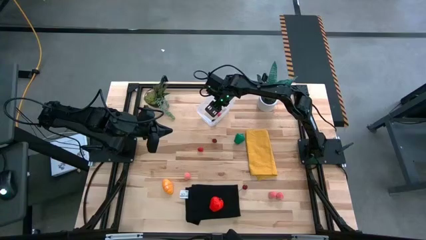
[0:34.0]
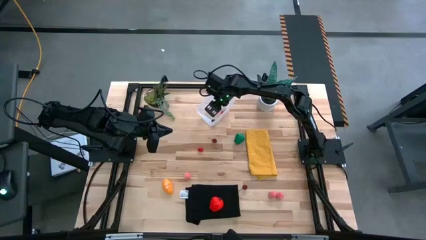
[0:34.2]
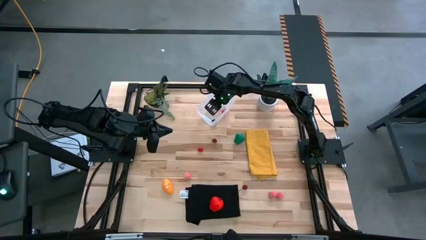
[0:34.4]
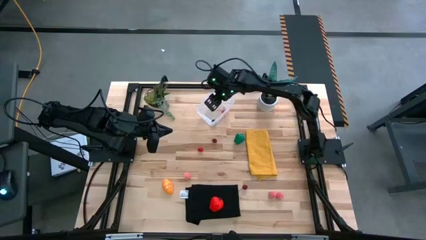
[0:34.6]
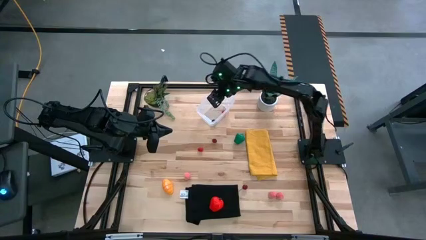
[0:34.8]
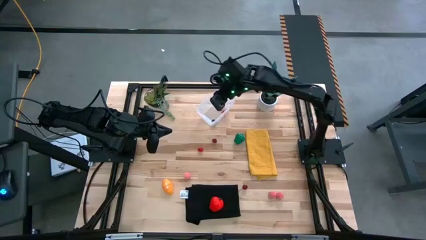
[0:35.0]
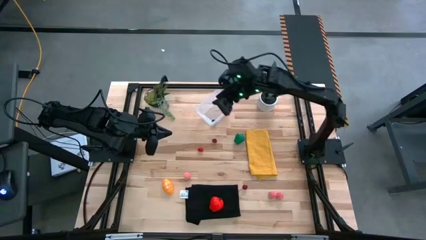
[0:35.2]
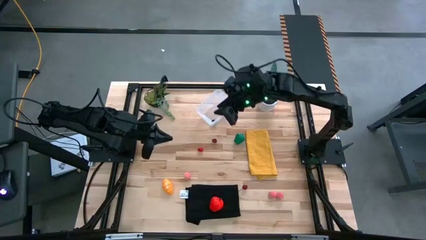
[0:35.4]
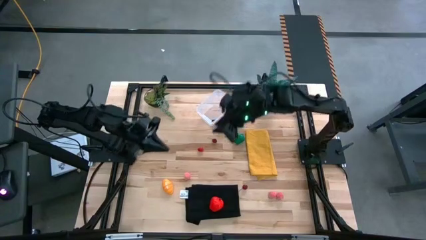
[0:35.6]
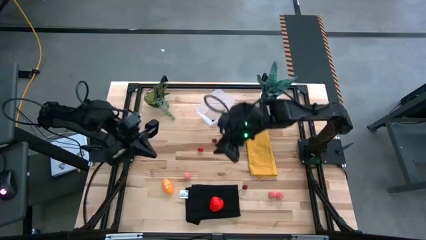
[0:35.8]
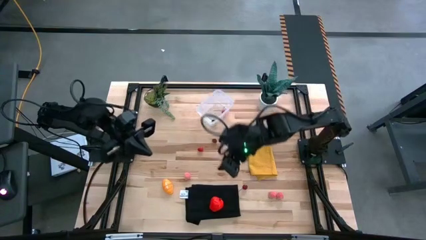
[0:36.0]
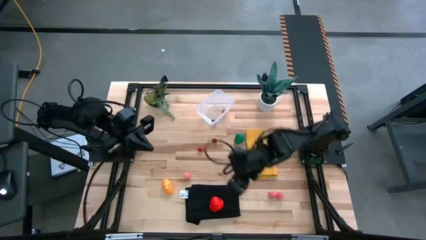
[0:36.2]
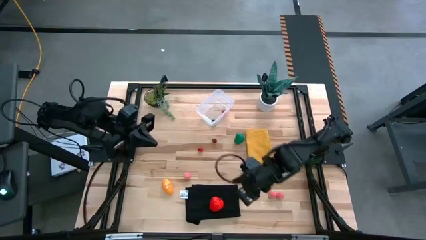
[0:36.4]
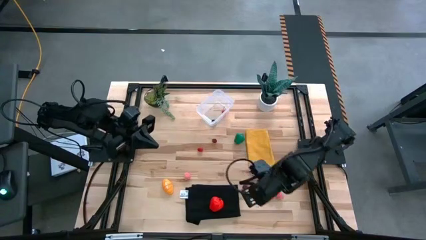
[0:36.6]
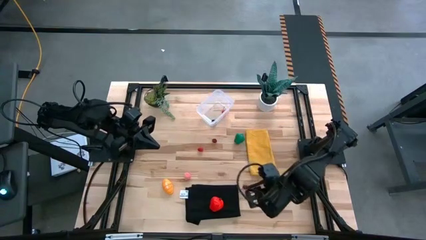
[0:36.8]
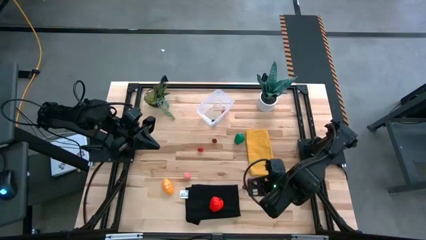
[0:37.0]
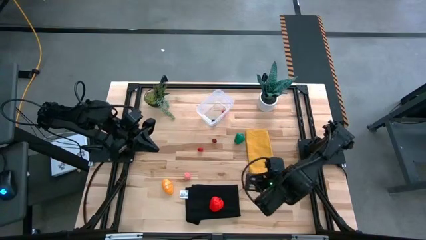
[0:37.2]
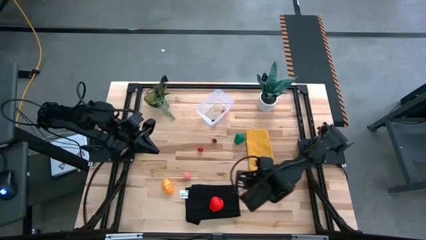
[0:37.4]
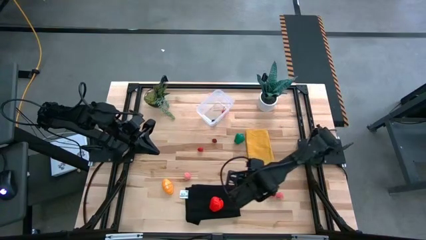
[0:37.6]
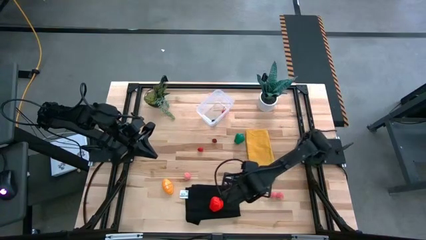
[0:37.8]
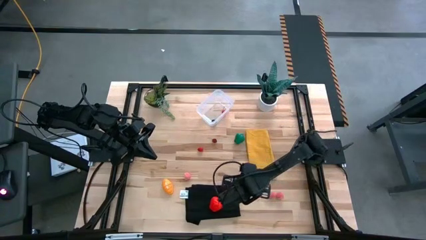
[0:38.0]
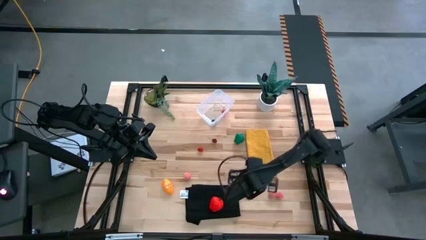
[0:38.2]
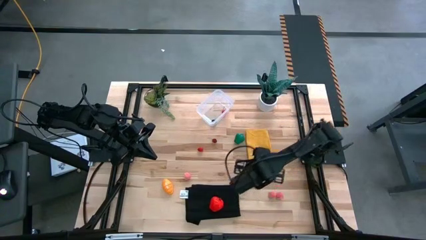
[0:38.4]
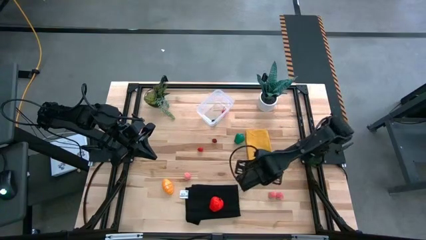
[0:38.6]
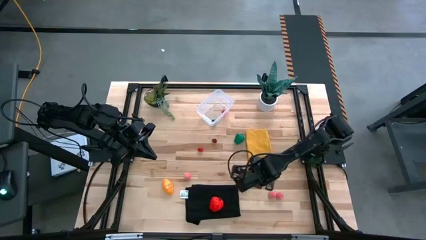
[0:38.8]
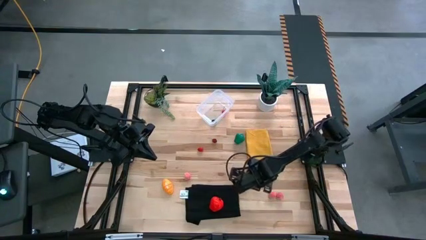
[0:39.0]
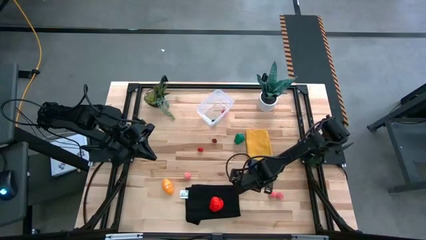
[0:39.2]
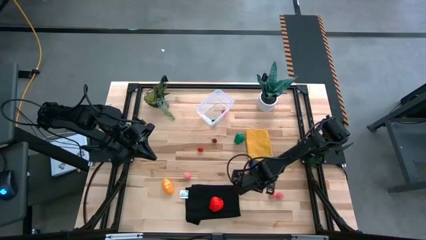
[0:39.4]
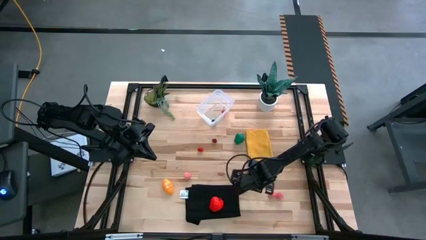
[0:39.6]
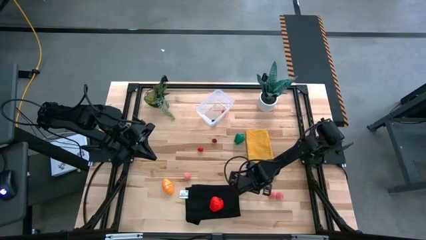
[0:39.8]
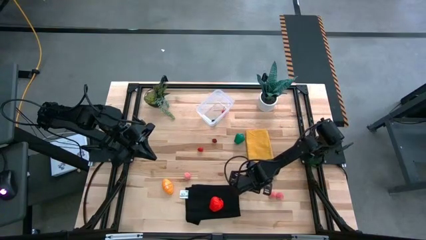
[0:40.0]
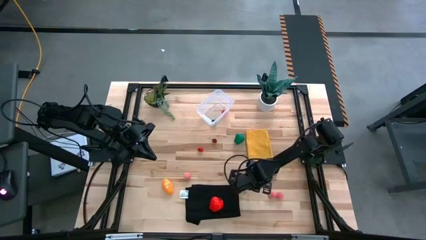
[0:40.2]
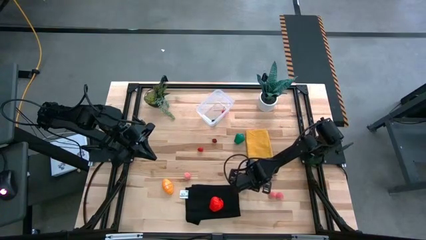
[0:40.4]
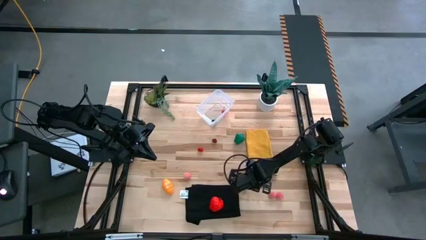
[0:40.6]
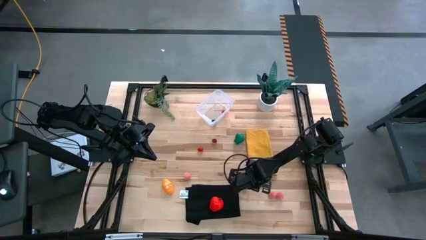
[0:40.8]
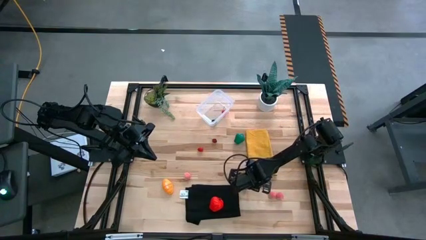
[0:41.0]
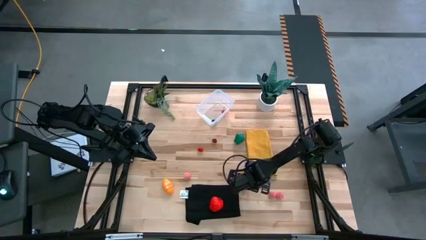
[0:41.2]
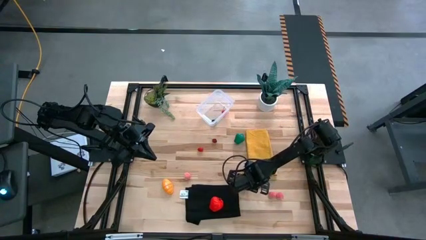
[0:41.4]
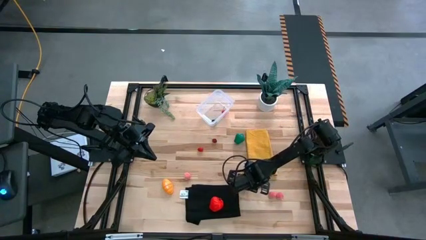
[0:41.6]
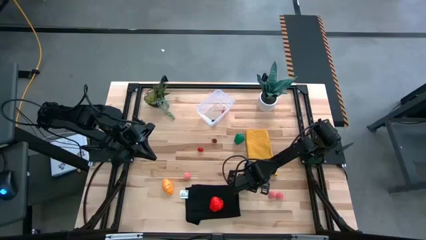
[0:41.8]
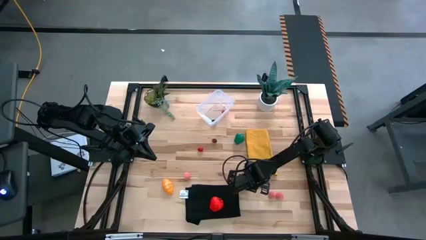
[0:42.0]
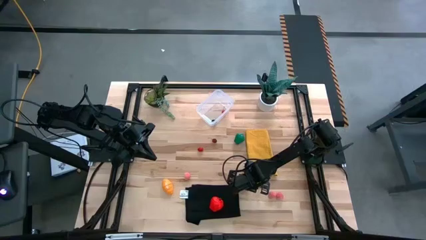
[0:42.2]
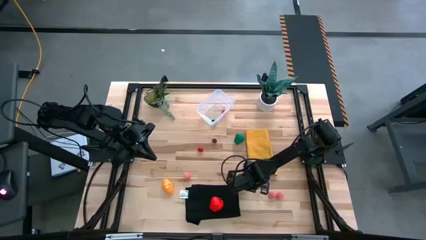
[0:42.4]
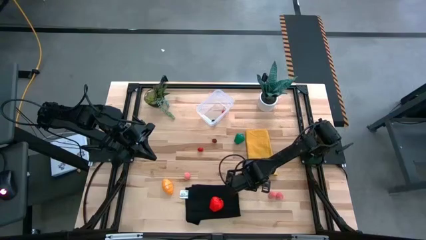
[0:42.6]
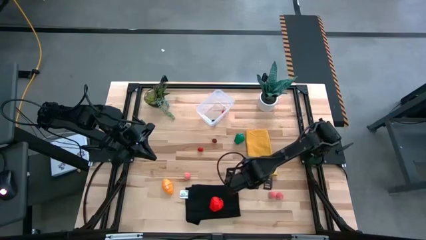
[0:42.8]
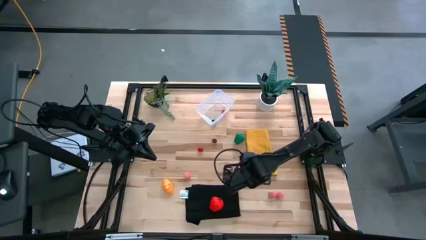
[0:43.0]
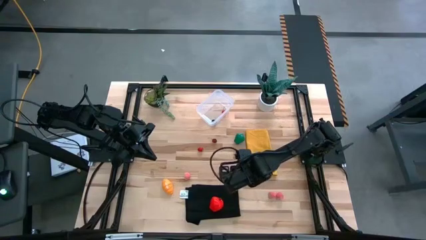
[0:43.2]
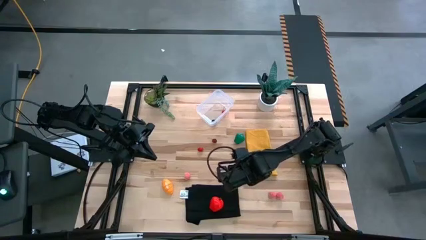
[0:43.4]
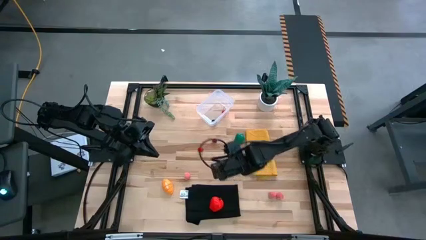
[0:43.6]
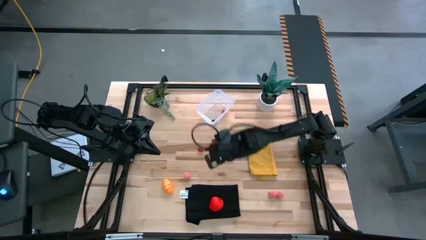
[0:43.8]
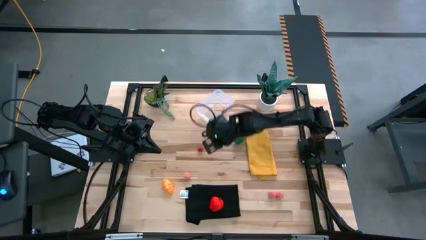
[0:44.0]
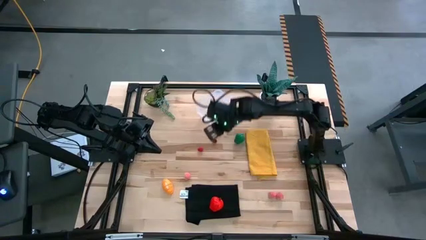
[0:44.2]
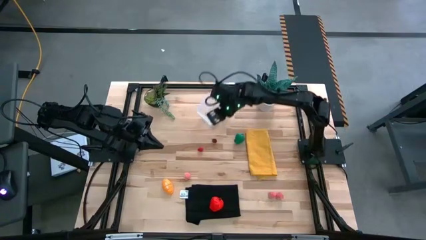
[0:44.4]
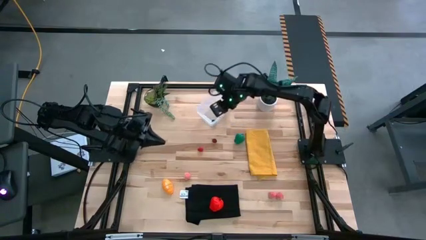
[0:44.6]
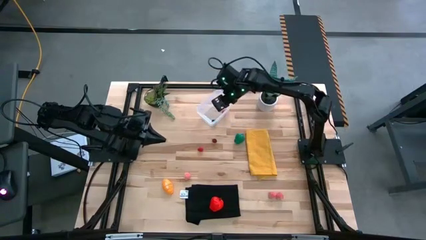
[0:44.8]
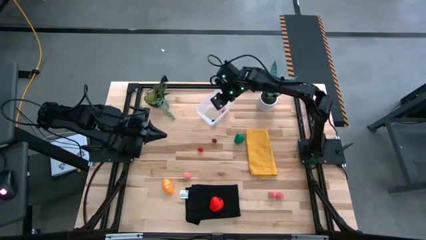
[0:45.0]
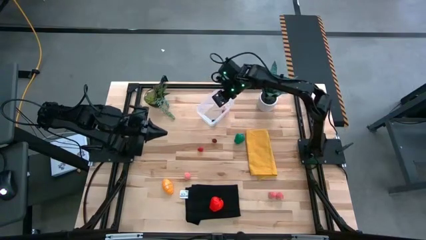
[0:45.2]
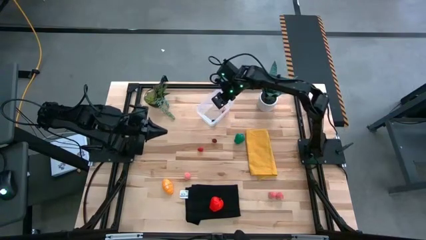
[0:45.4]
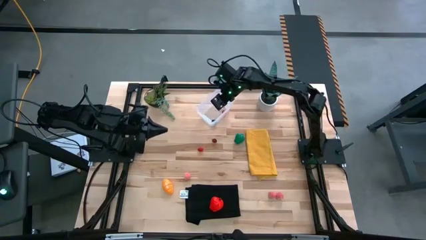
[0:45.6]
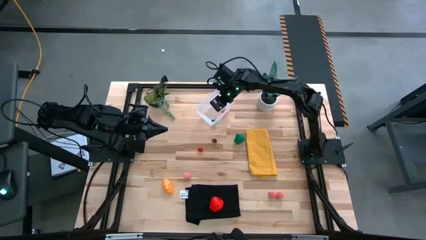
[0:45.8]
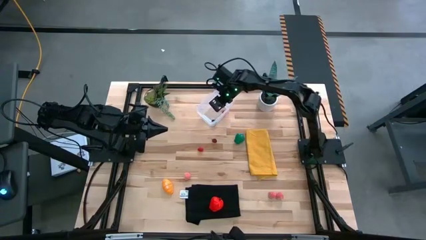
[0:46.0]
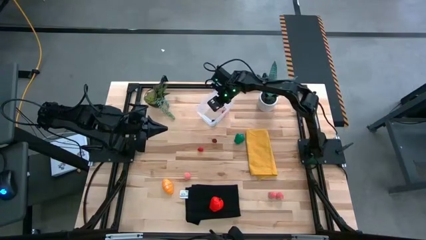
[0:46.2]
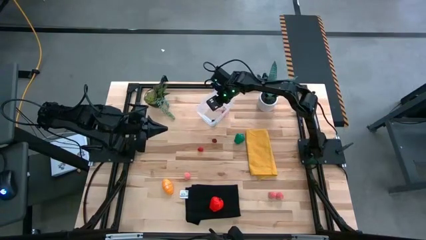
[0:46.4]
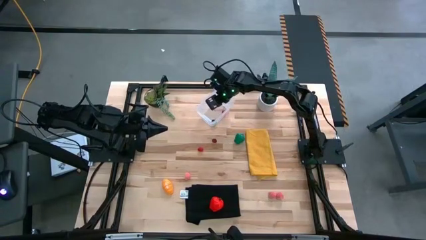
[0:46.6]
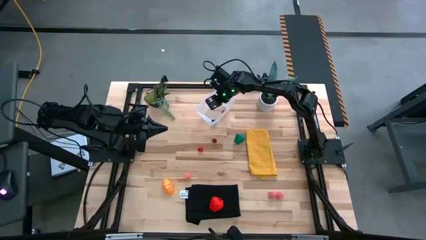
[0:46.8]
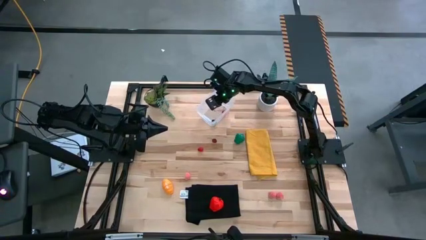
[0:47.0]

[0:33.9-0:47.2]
Task: Pick and placing Produce into tupperware
Put the bottom red cherry into the transparent bin
